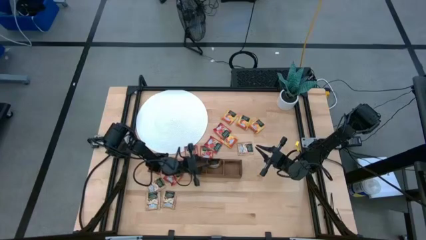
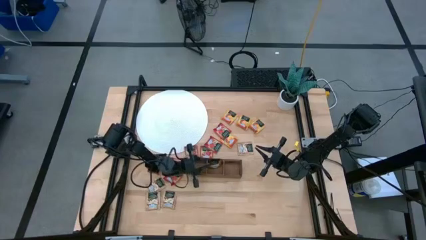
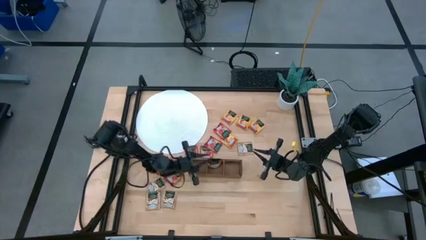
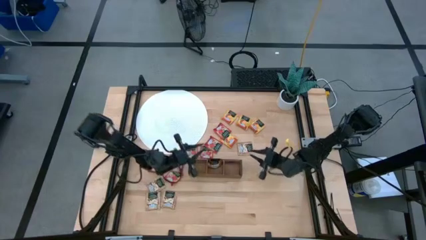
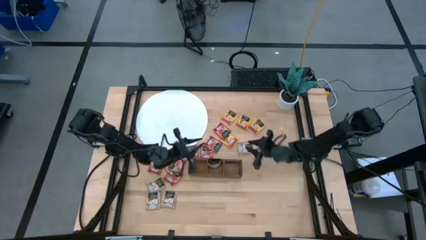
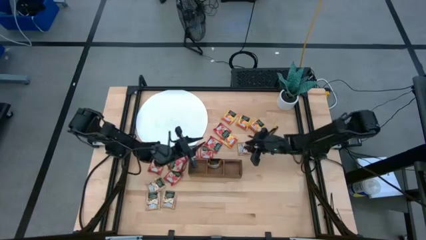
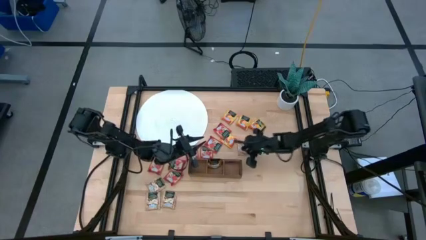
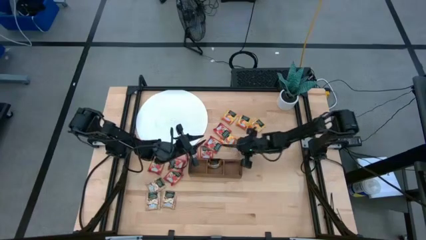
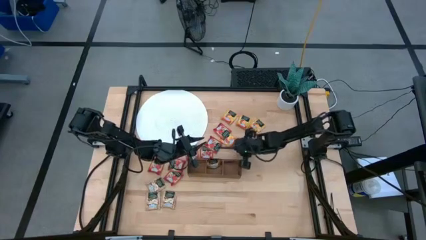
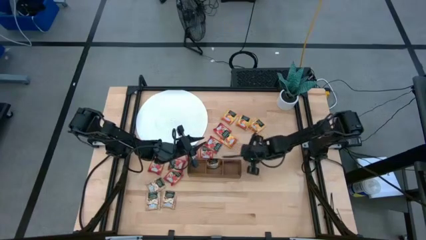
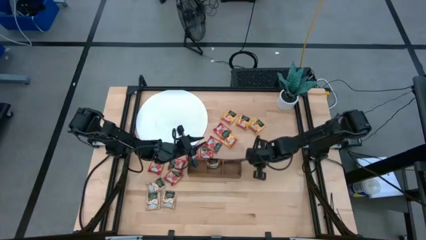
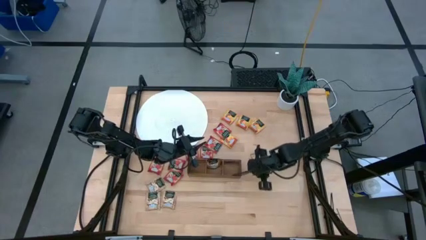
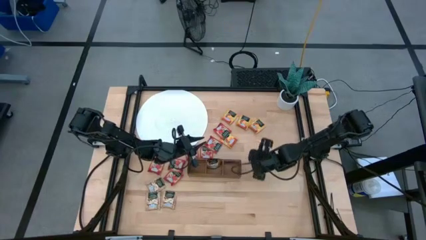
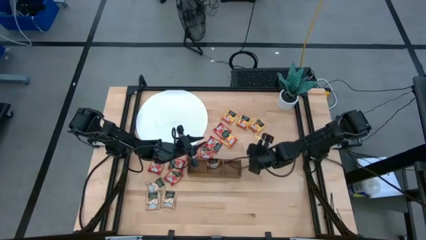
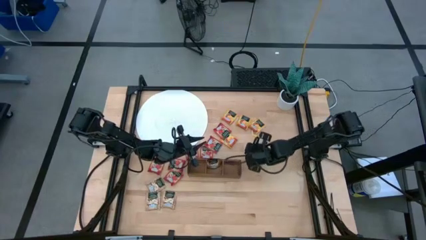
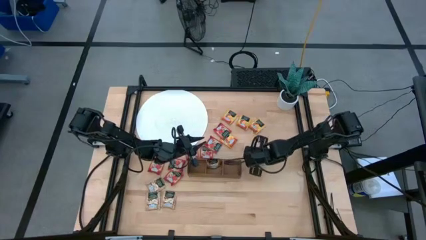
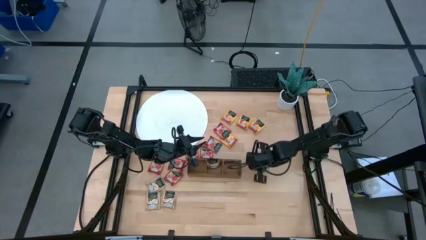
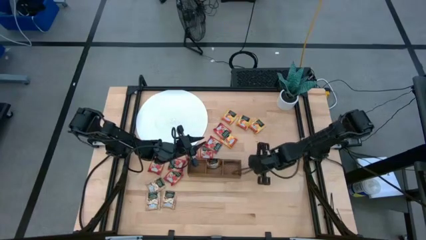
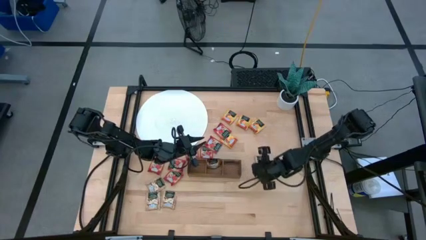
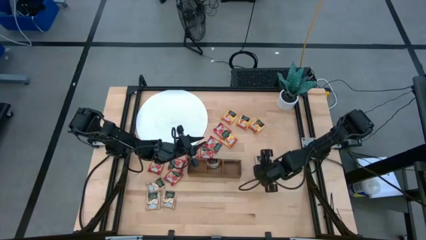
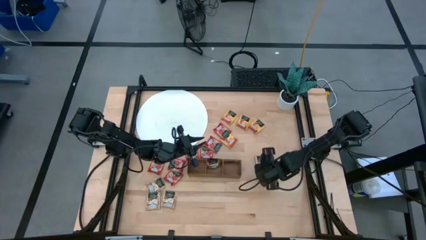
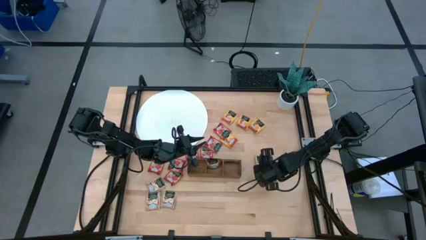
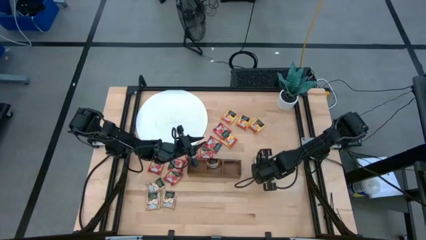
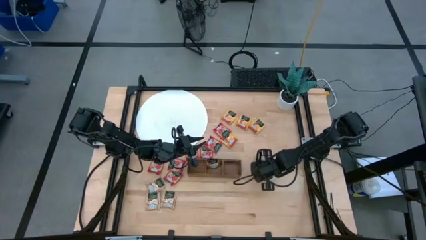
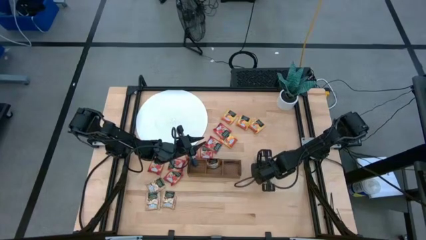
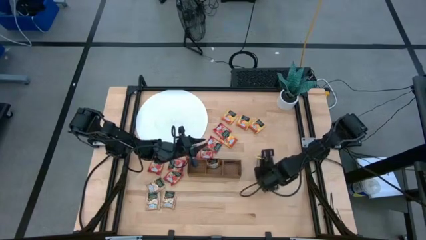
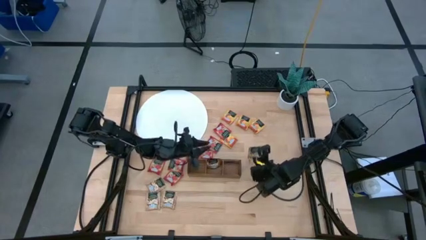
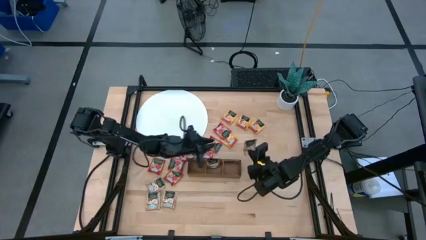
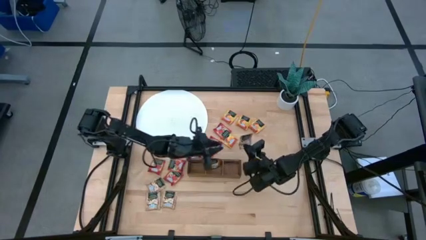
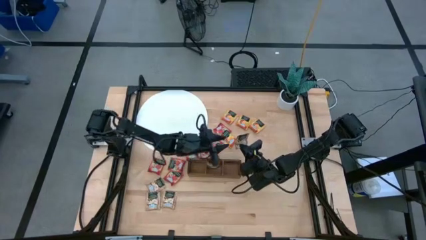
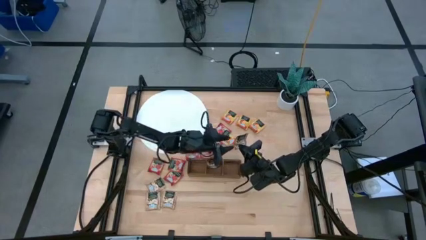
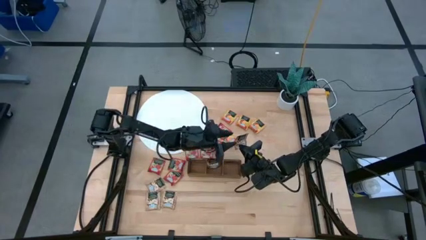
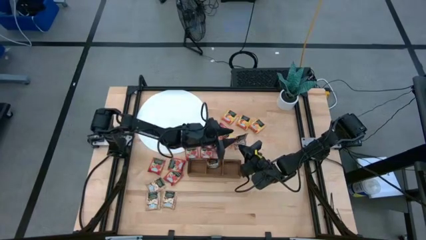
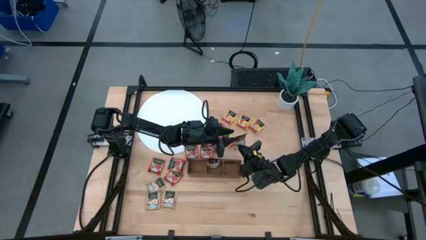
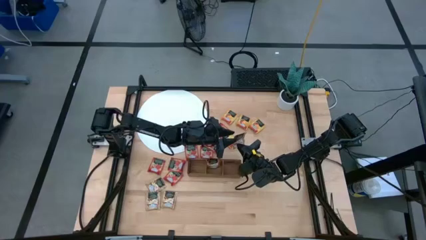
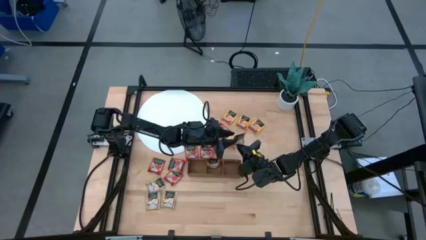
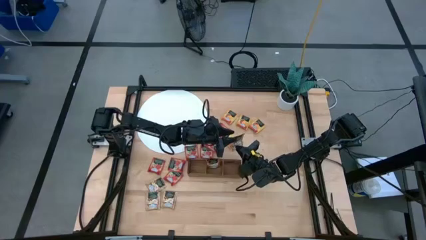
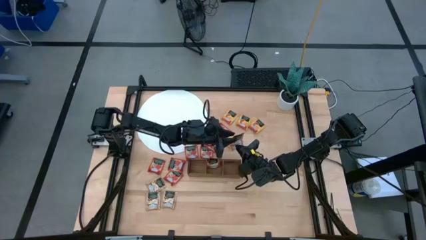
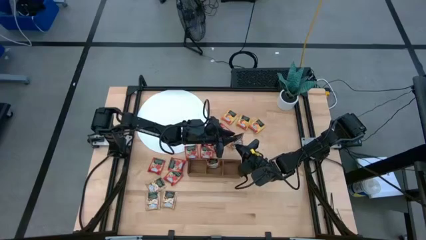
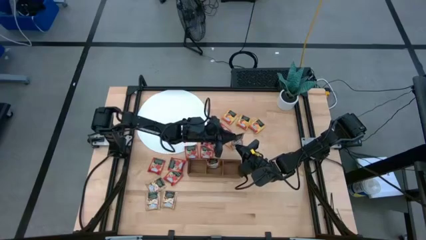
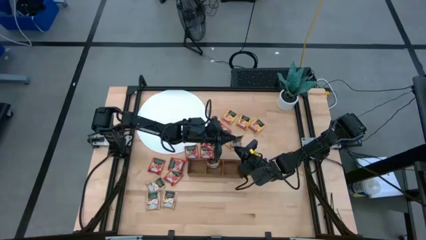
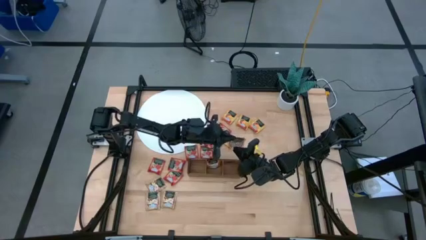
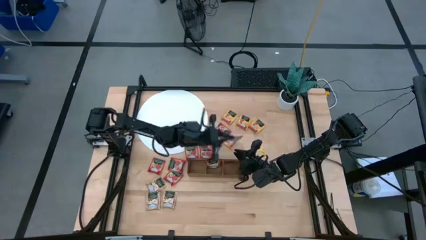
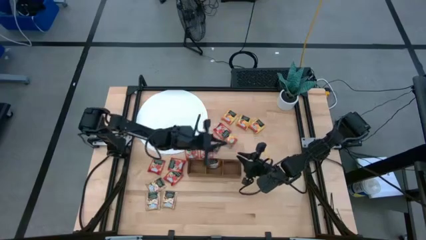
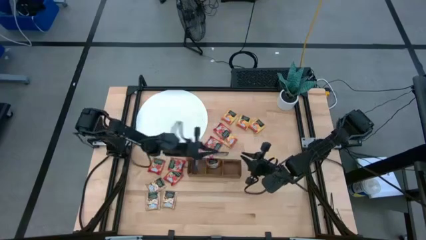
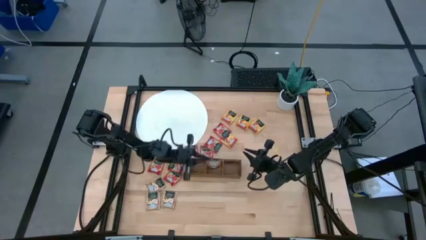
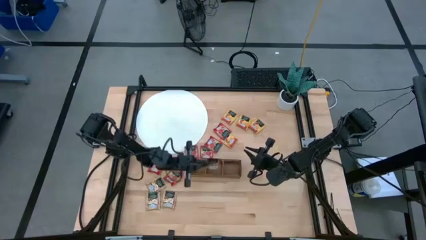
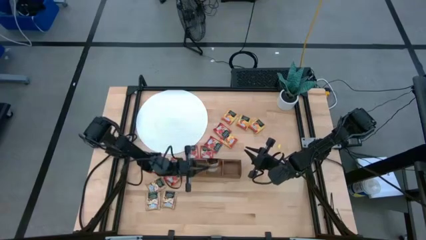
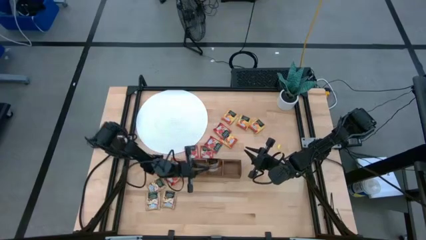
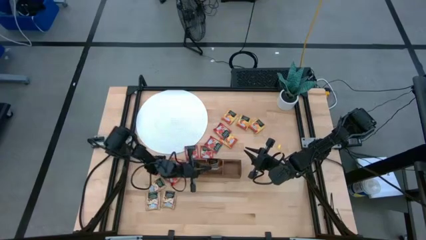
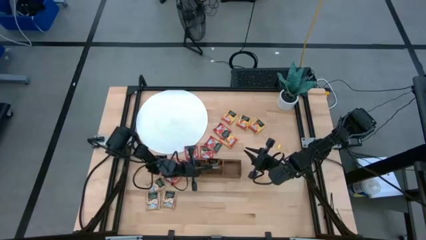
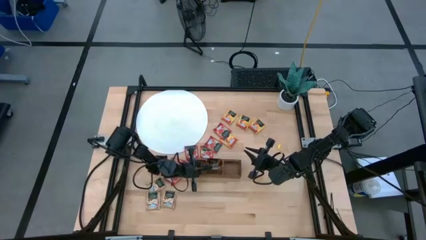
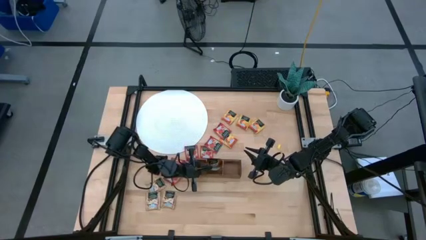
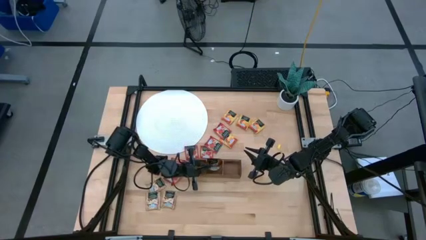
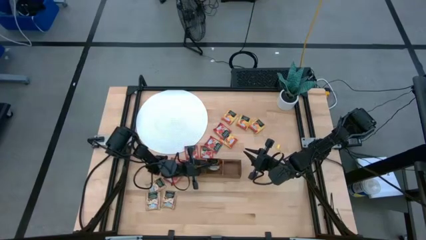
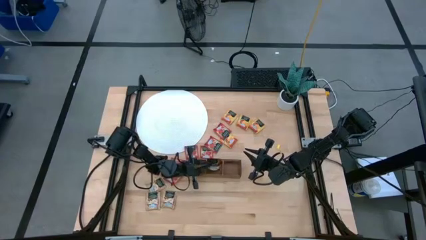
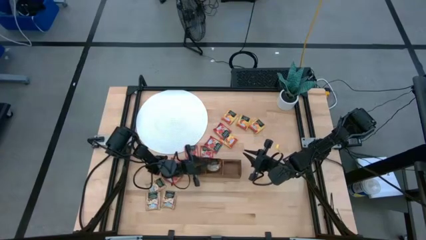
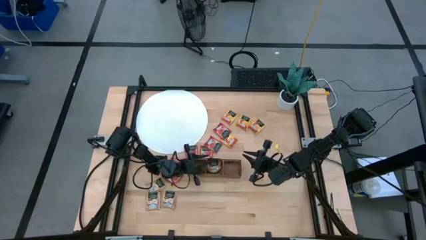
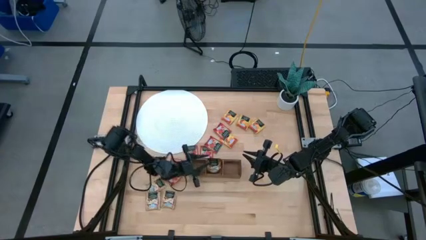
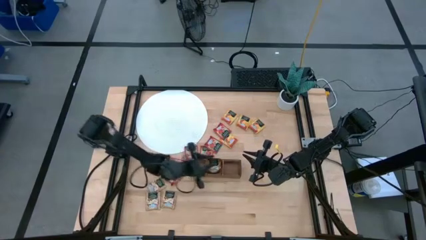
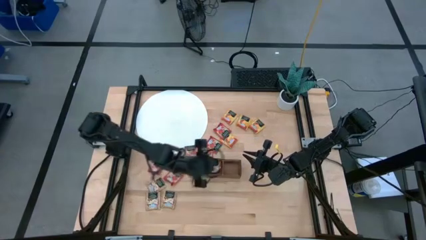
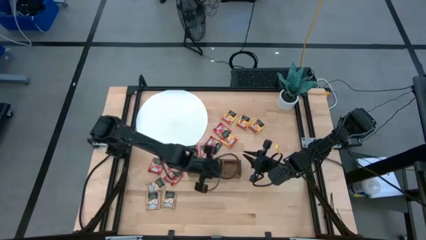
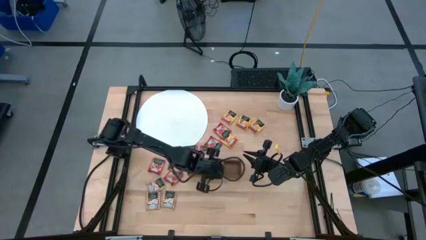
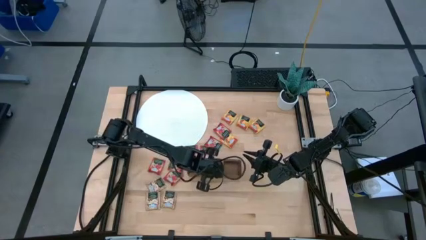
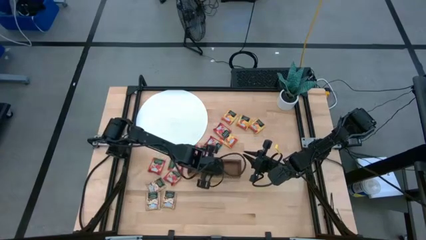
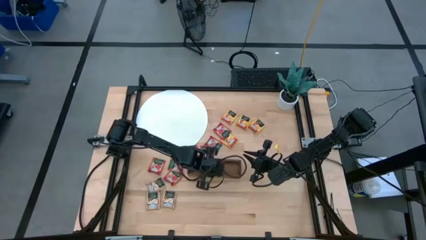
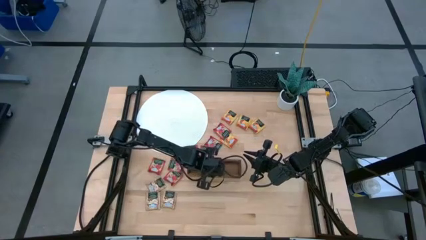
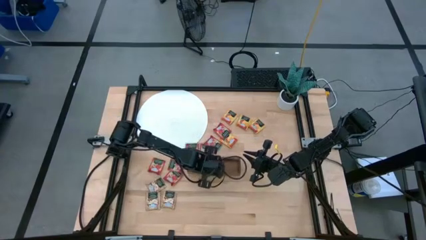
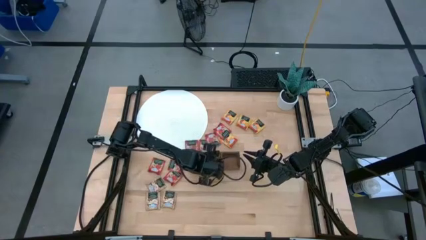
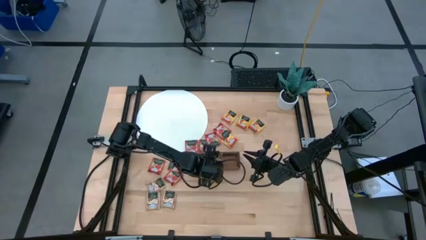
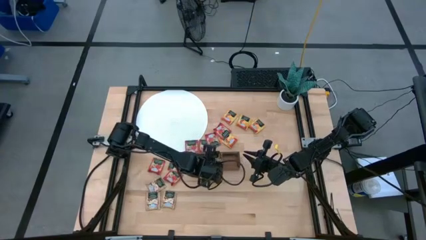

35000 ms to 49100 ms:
Task: Pick & Place Tea
Put the brown tea bag into the middle section of the wooden organizer
